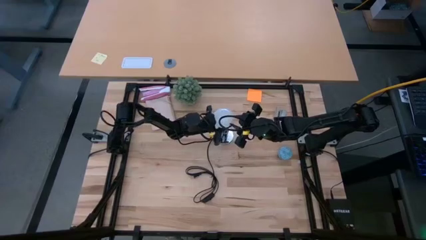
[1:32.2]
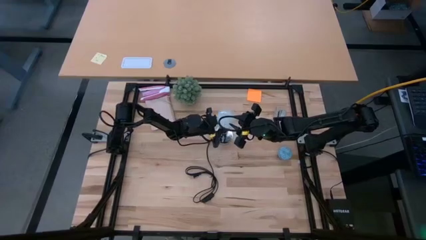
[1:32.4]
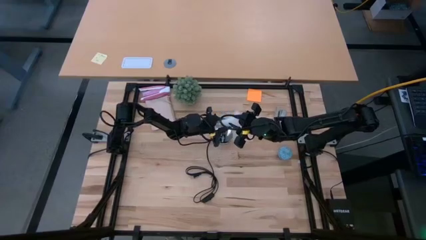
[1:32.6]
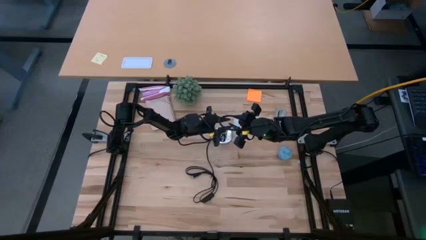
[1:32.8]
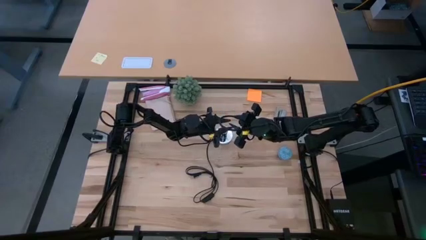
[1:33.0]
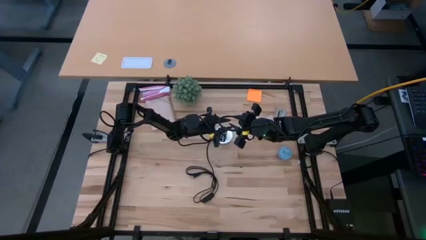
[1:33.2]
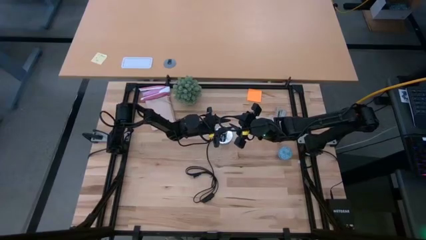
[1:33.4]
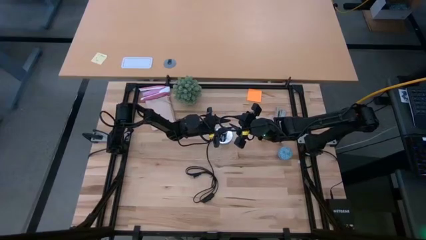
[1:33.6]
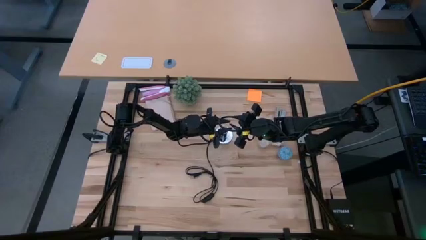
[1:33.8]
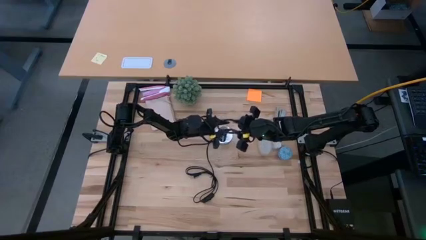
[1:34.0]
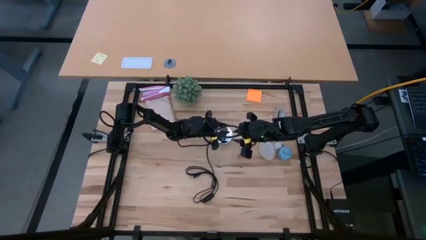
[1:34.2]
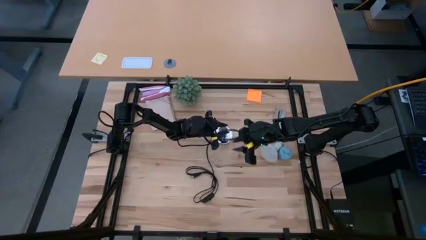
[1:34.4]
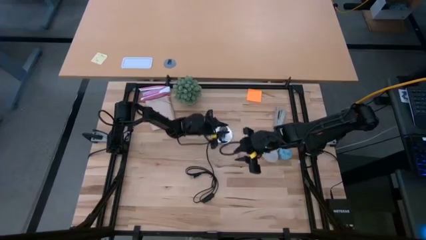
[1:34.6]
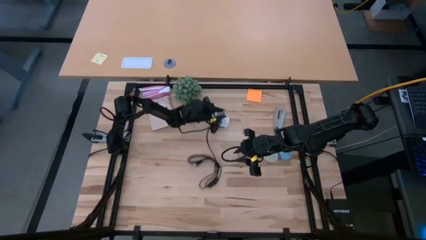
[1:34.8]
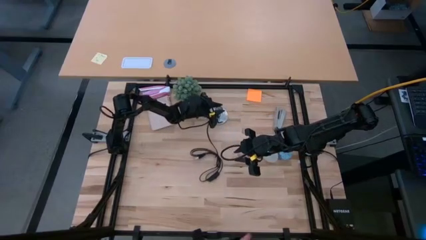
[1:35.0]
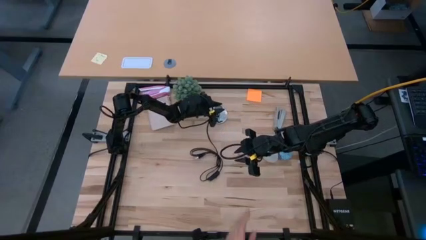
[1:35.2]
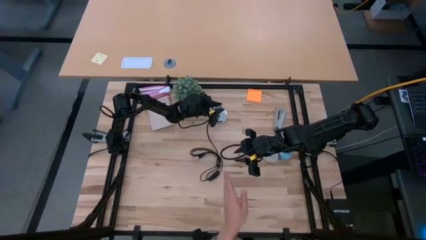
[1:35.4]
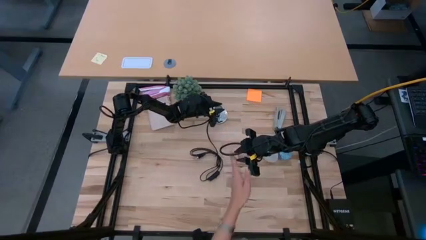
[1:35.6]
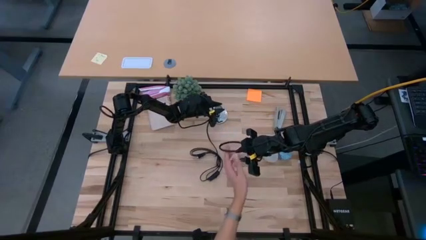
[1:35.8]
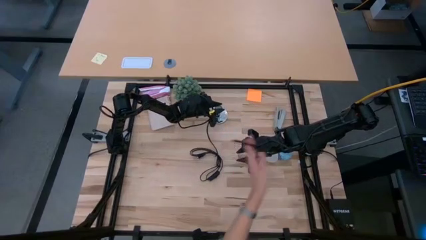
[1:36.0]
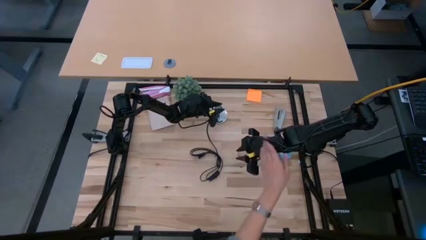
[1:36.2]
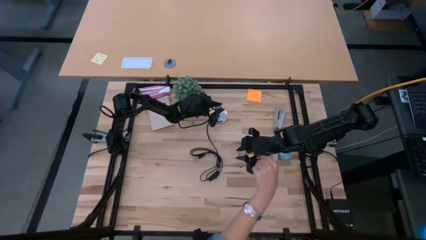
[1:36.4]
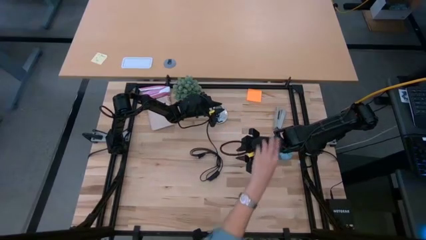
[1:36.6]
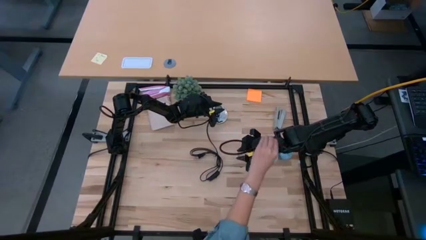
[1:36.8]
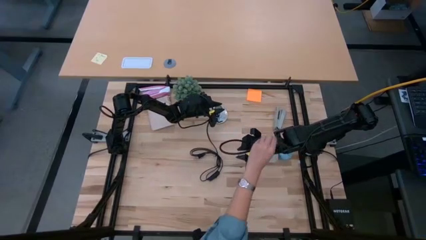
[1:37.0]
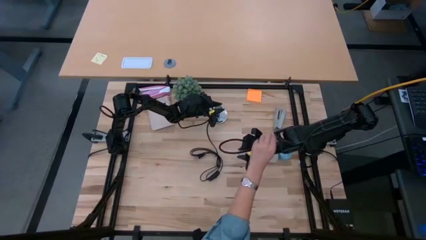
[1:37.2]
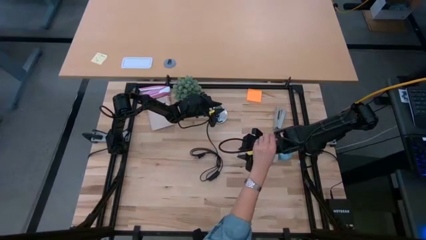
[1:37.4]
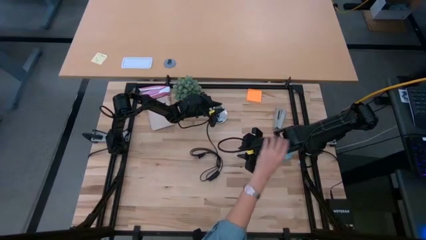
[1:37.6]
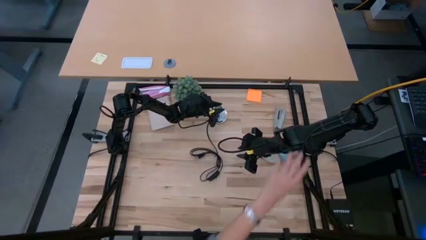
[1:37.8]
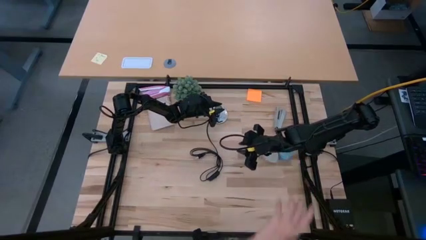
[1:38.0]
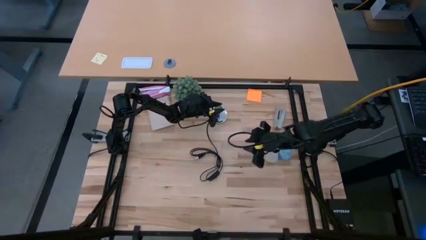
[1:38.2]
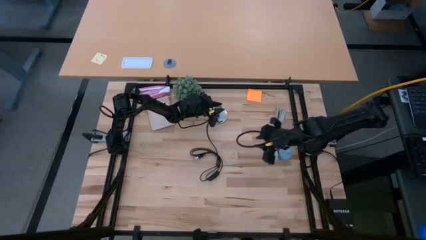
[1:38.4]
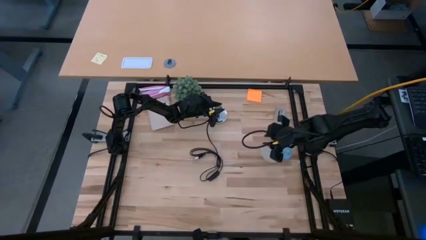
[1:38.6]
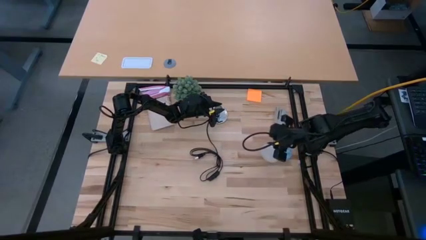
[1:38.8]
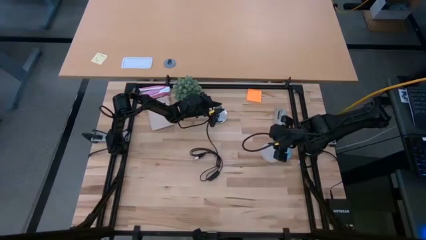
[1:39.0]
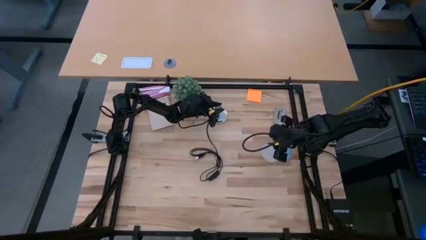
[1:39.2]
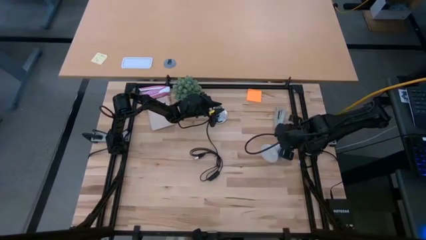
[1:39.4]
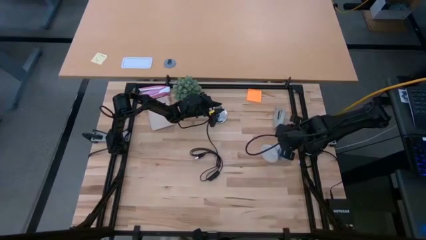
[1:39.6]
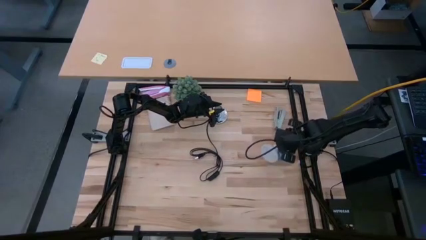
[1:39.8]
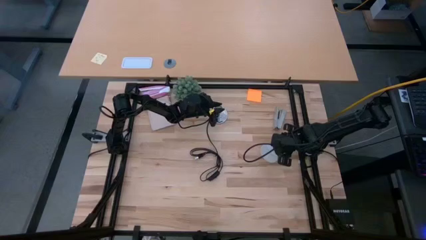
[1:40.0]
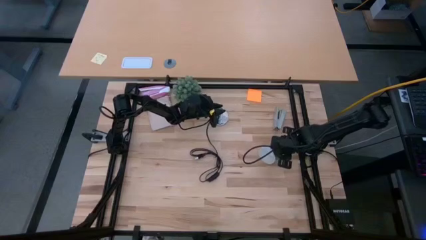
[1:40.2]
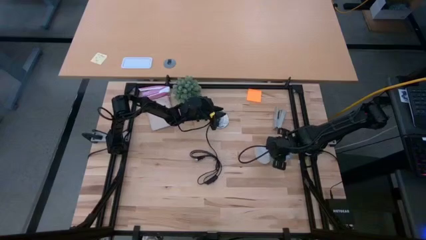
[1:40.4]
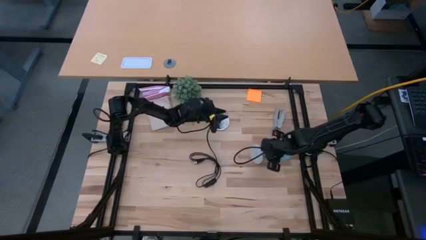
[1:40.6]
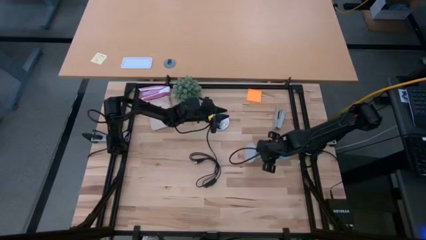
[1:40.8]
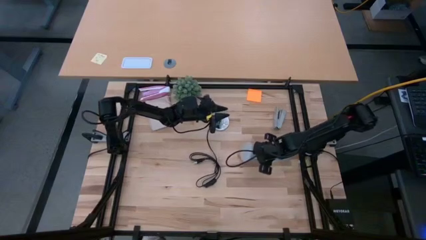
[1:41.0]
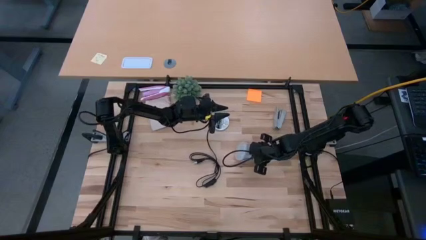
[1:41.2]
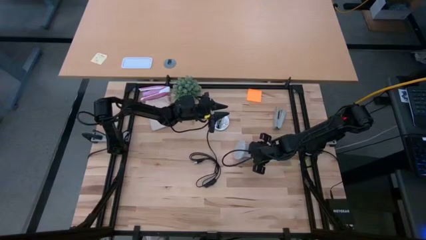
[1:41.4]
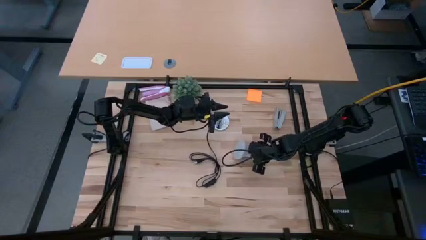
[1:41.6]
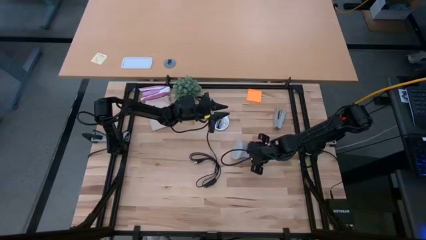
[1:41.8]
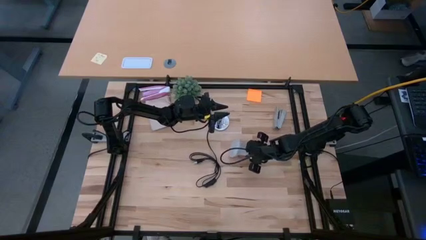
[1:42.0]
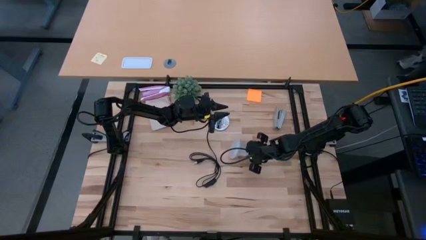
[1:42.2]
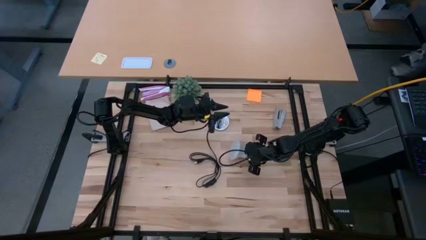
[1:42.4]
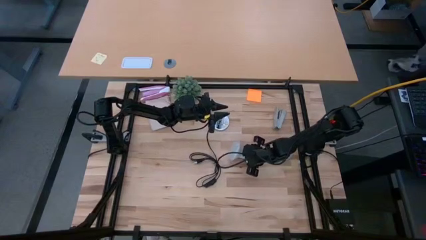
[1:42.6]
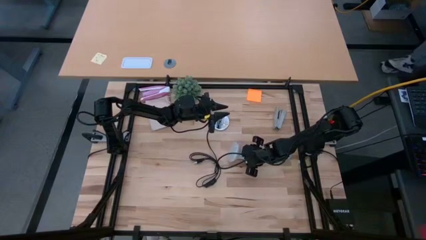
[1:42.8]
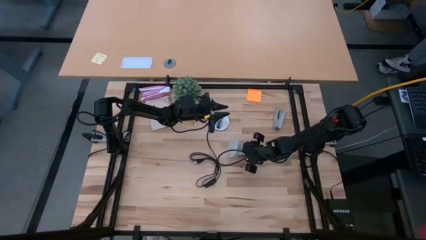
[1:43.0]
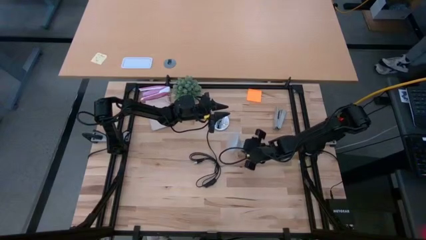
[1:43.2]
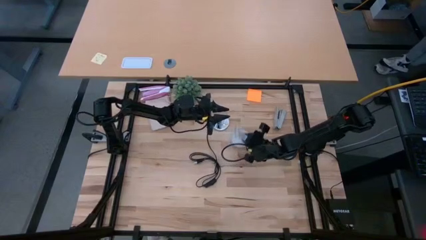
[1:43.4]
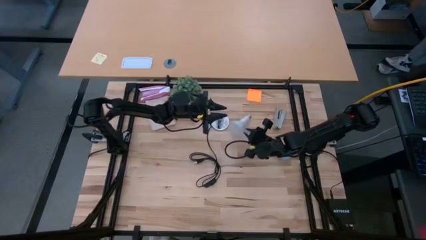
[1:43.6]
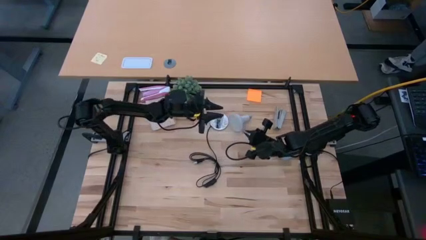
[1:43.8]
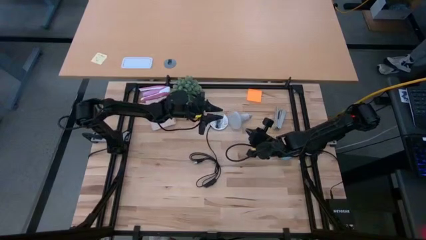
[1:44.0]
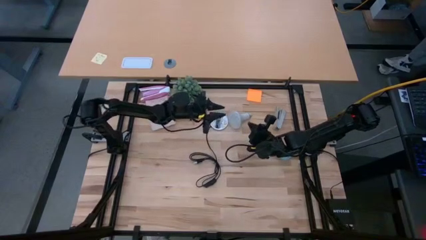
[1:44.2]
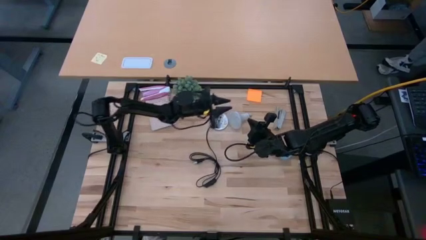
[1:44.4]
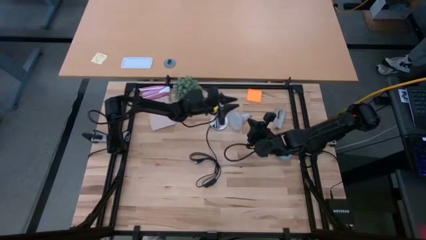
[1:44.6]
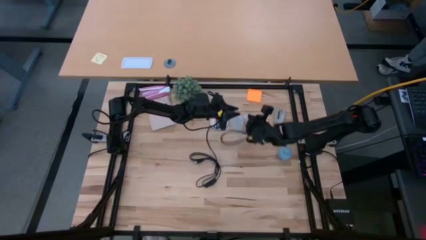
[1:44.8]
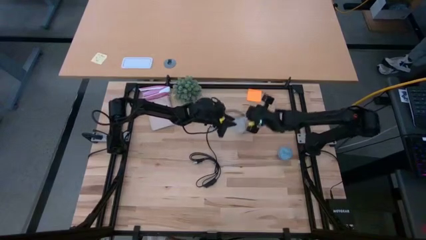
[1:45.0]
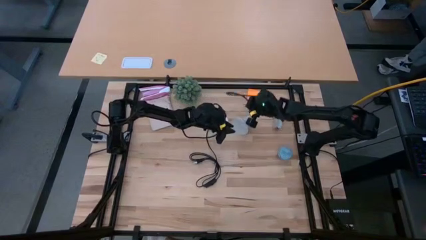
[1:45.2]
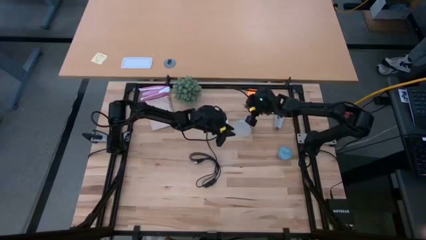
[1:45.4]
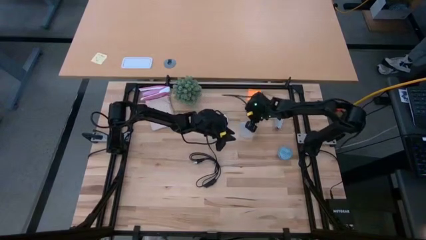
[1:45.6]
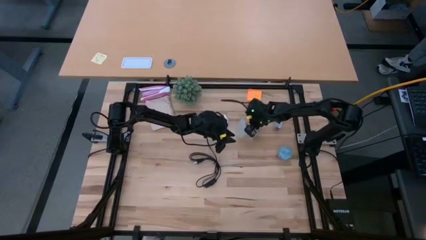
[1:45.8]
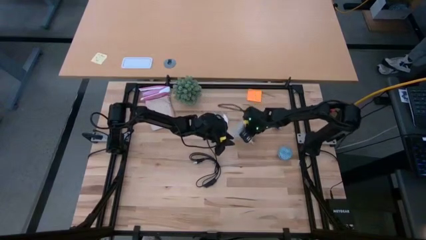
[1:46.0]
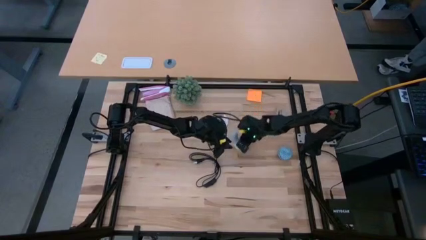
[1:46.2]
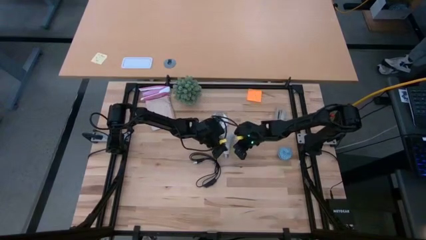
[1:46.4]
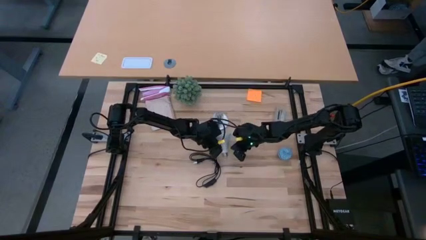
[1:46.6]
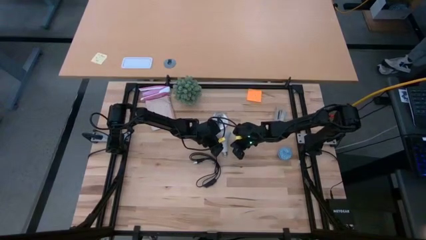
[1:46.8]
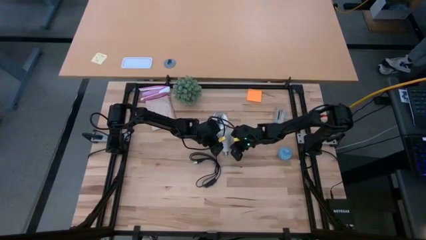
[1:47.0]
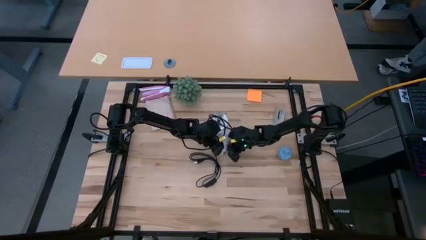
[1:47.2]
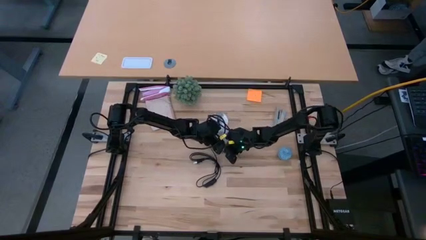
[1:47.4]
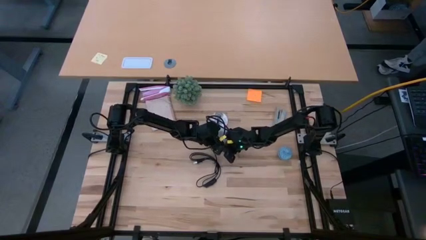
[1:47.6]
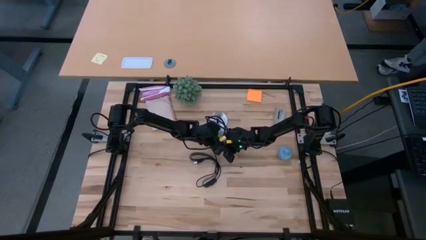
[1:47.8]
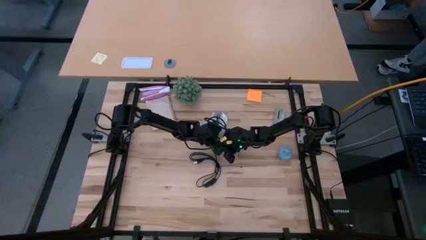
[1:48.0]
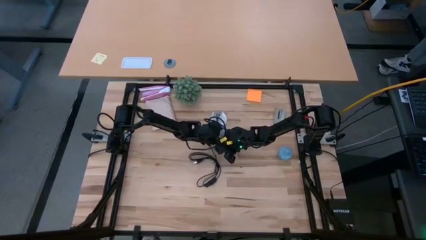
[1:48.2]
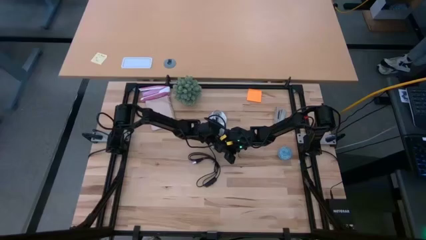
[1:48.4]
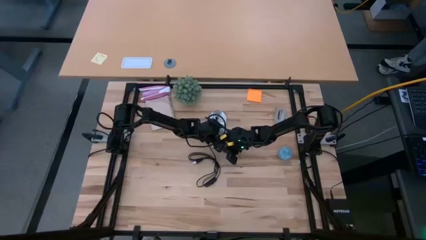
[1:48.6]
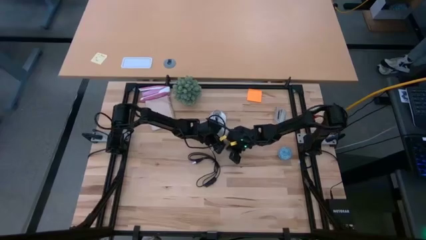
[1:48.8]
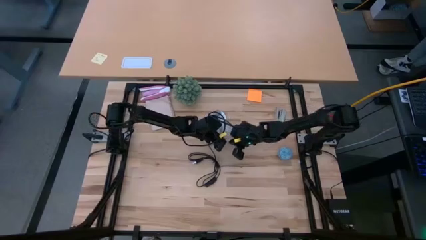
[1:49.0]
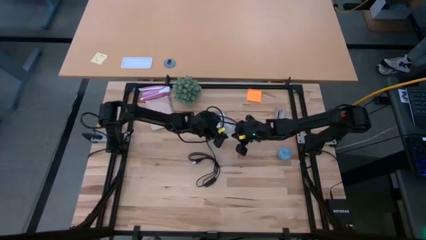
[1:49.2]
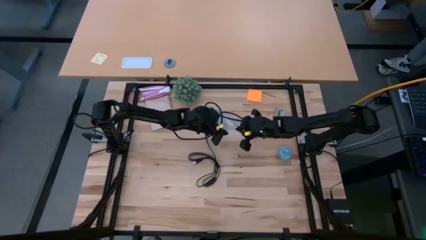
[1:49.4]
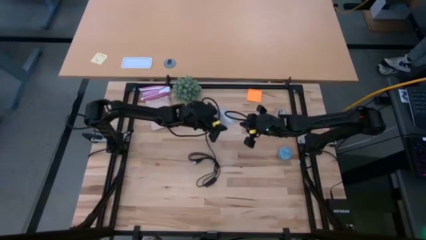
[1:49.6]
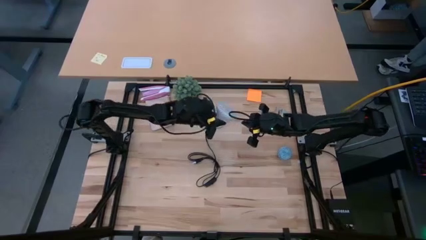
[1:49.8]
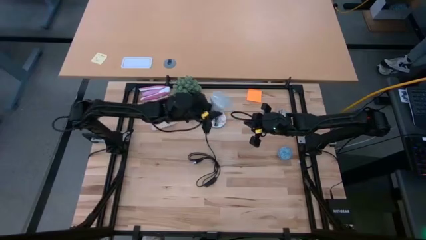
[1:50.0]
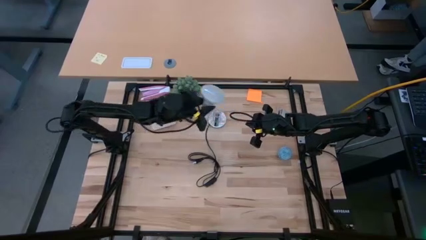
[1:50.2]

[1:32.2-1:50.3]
Task: Screw lightbulb
Insert the lightbulb into the lamp
